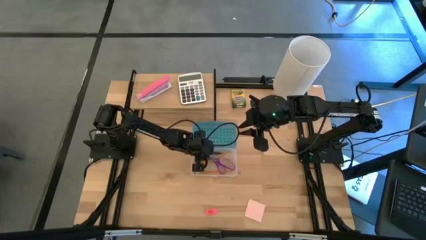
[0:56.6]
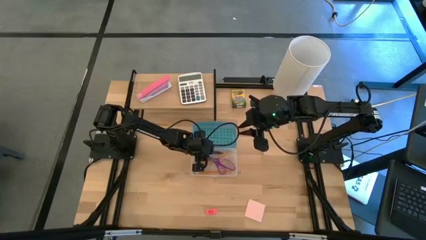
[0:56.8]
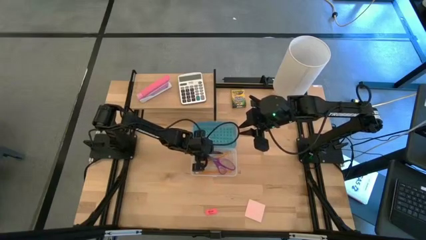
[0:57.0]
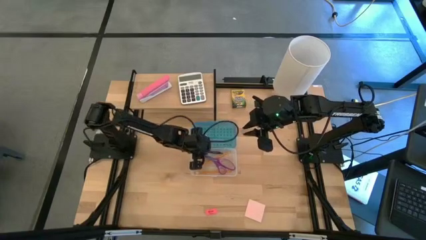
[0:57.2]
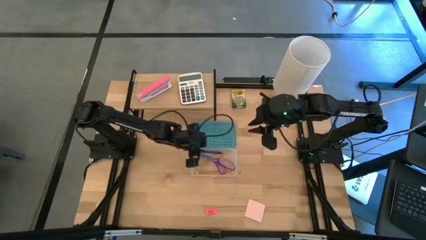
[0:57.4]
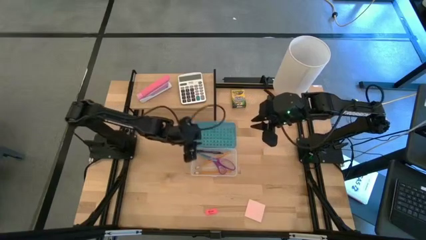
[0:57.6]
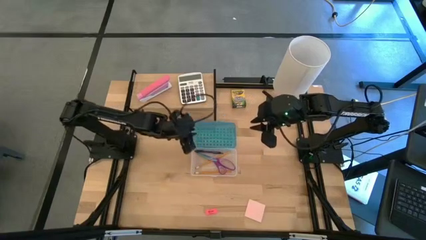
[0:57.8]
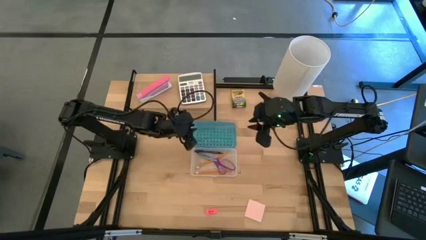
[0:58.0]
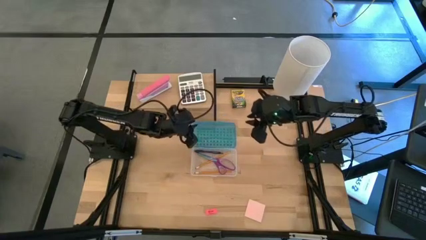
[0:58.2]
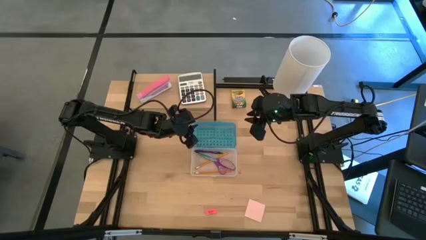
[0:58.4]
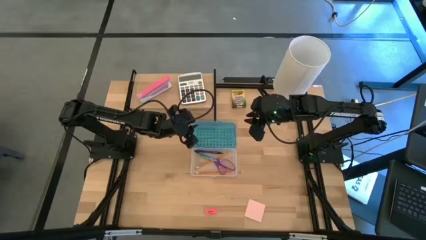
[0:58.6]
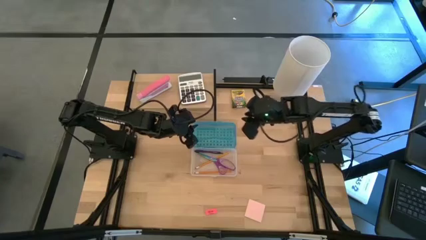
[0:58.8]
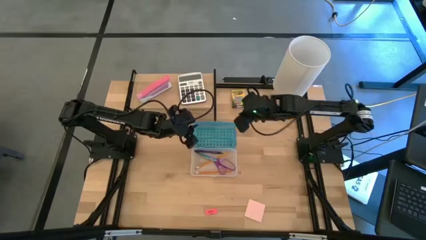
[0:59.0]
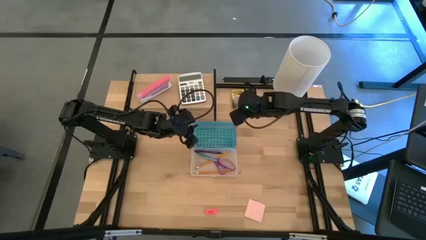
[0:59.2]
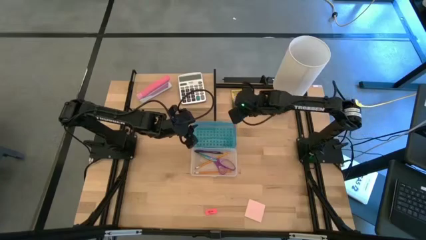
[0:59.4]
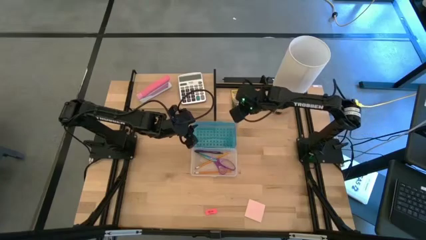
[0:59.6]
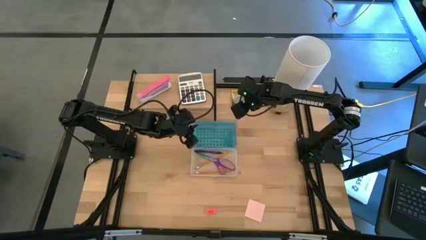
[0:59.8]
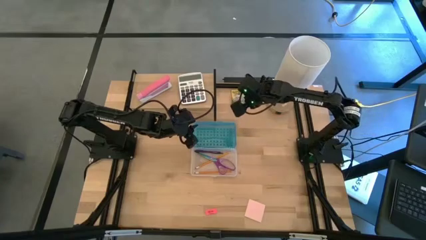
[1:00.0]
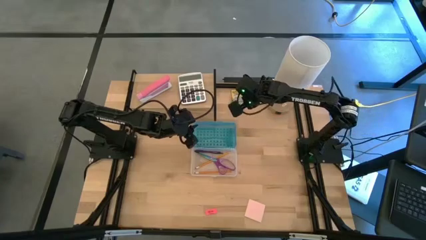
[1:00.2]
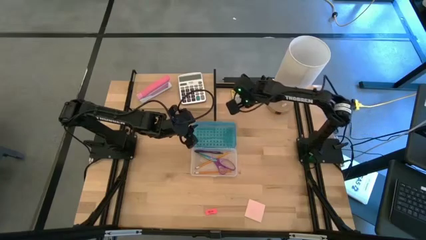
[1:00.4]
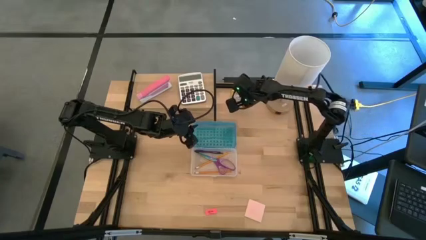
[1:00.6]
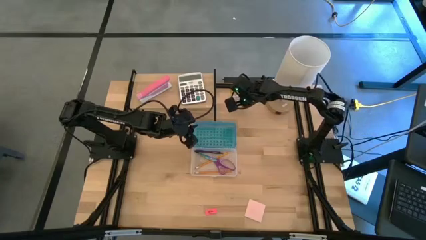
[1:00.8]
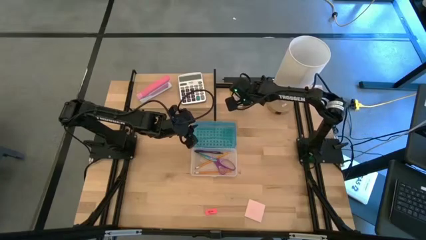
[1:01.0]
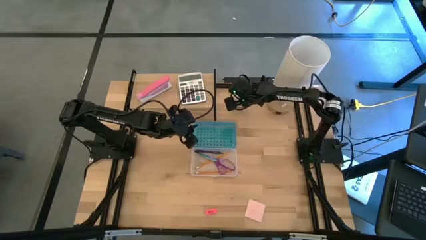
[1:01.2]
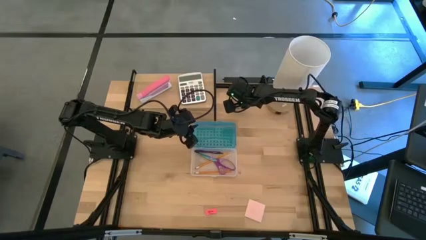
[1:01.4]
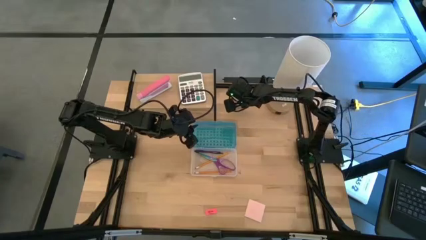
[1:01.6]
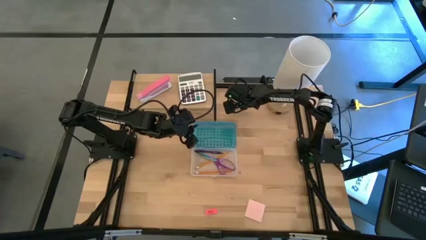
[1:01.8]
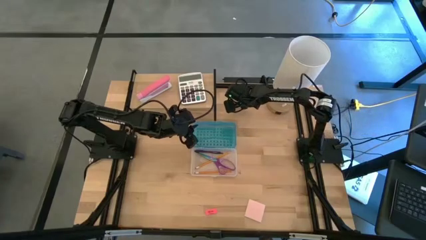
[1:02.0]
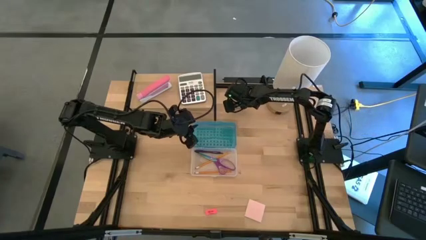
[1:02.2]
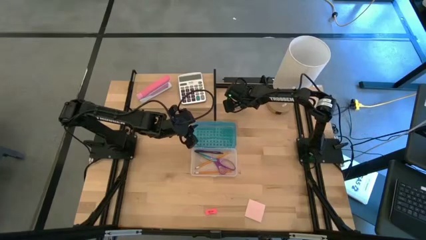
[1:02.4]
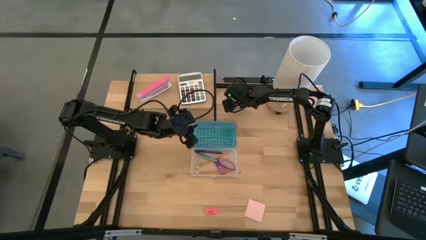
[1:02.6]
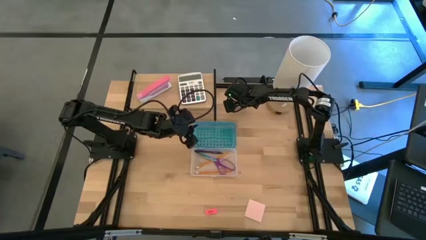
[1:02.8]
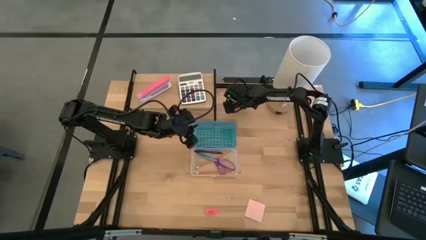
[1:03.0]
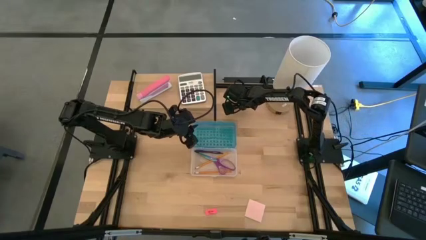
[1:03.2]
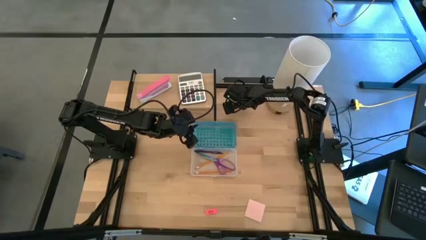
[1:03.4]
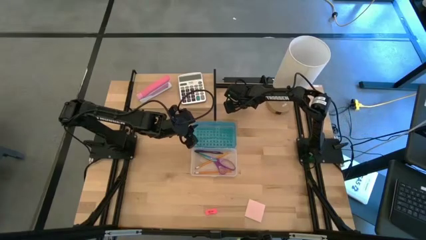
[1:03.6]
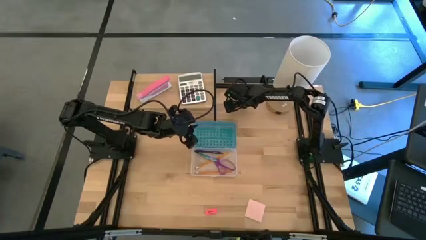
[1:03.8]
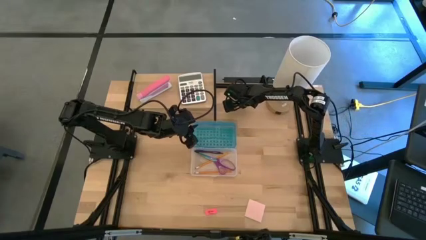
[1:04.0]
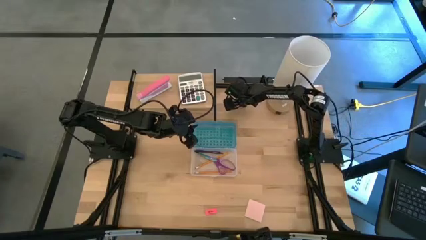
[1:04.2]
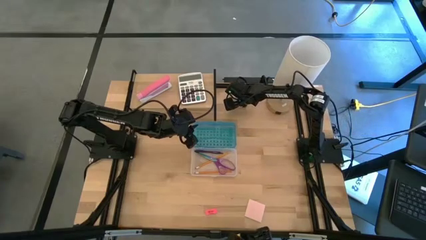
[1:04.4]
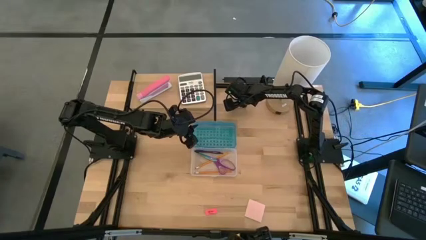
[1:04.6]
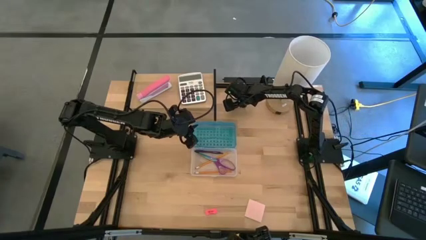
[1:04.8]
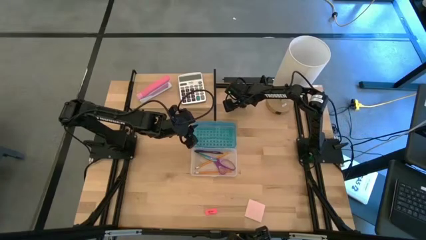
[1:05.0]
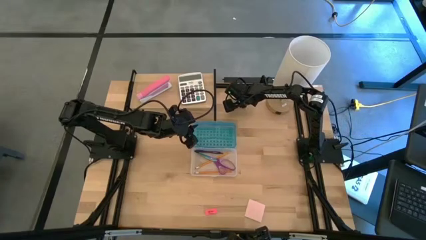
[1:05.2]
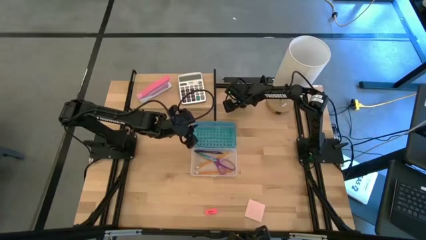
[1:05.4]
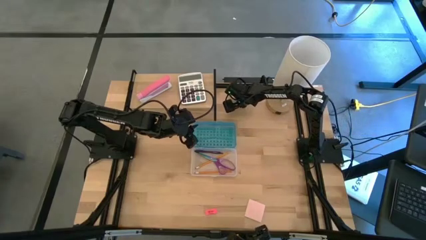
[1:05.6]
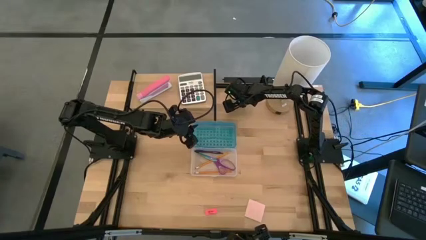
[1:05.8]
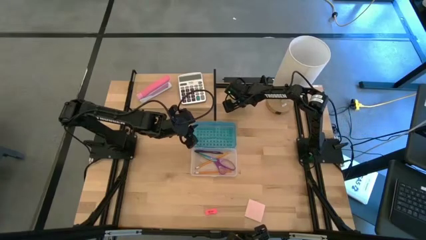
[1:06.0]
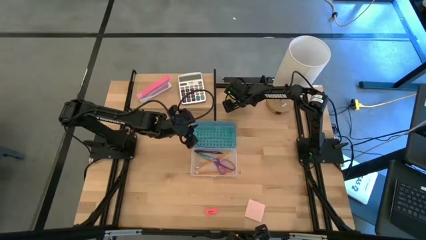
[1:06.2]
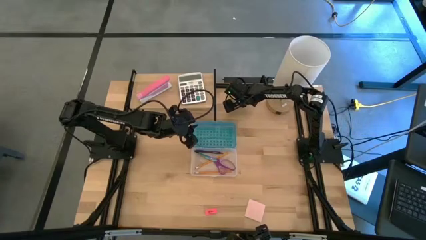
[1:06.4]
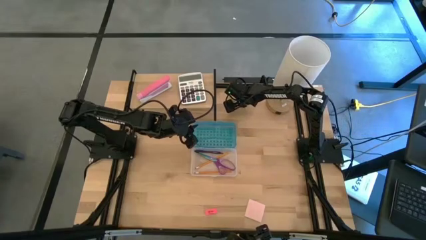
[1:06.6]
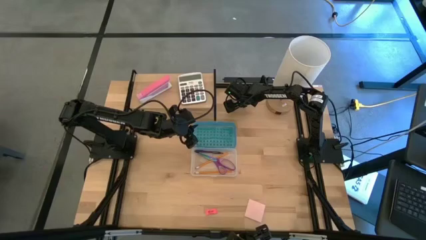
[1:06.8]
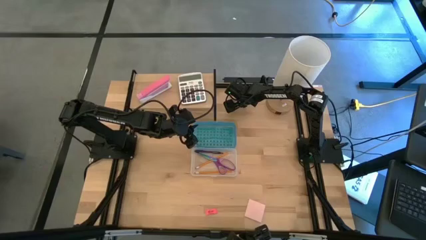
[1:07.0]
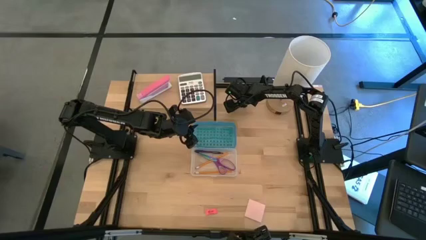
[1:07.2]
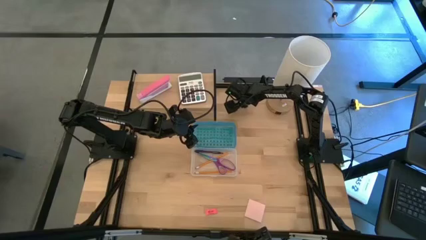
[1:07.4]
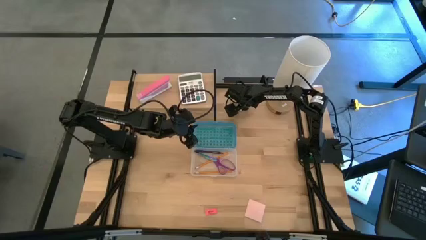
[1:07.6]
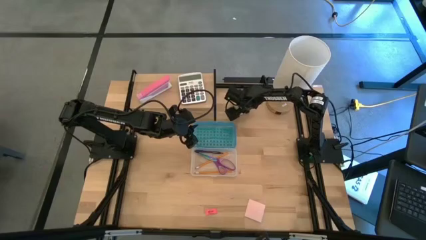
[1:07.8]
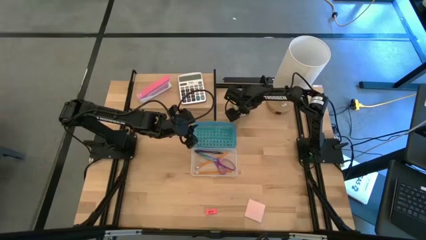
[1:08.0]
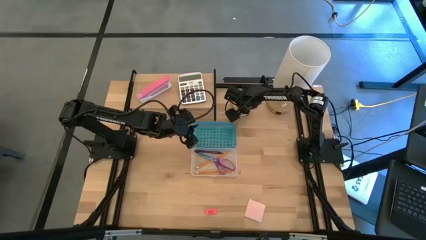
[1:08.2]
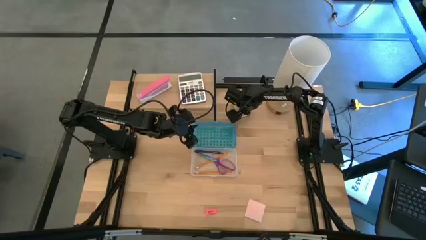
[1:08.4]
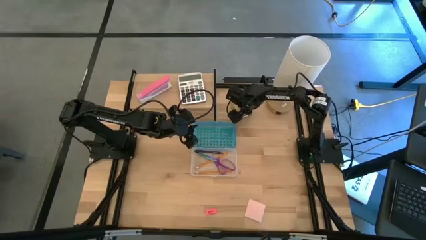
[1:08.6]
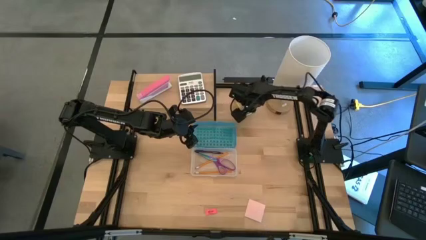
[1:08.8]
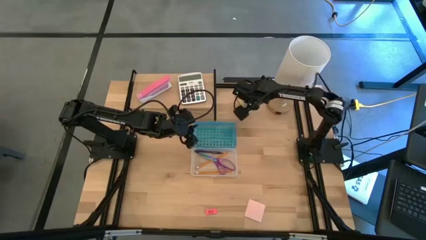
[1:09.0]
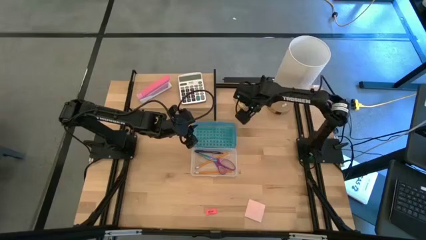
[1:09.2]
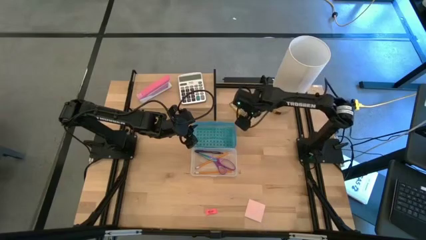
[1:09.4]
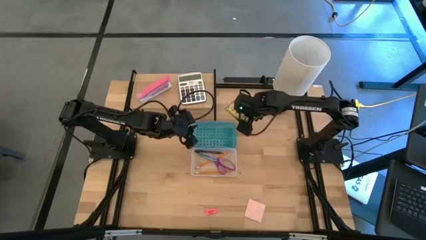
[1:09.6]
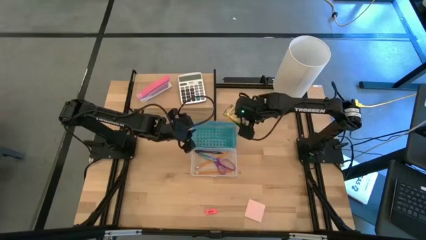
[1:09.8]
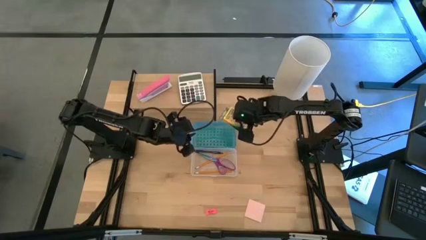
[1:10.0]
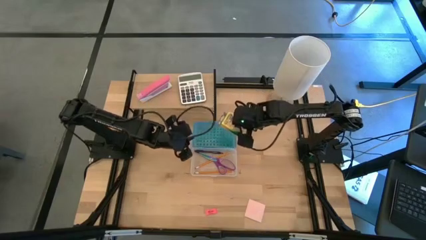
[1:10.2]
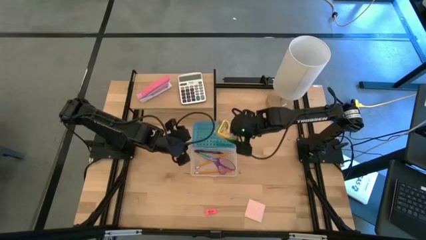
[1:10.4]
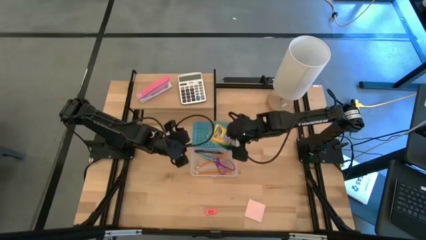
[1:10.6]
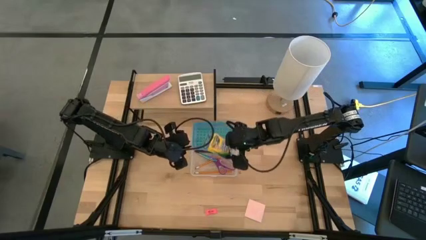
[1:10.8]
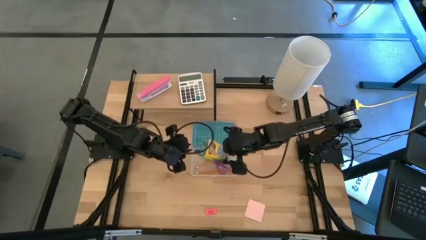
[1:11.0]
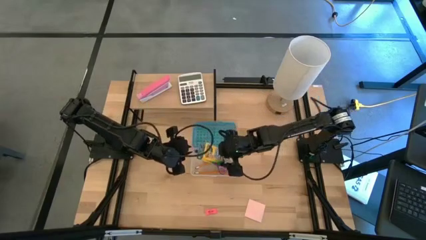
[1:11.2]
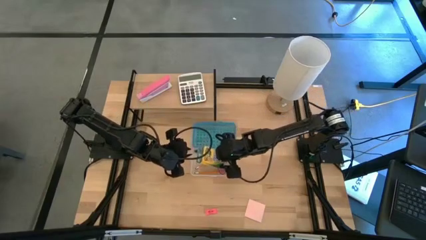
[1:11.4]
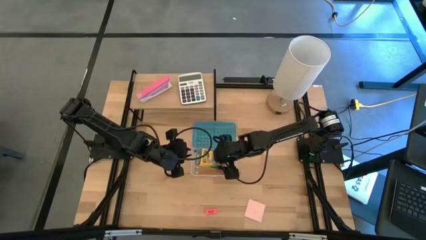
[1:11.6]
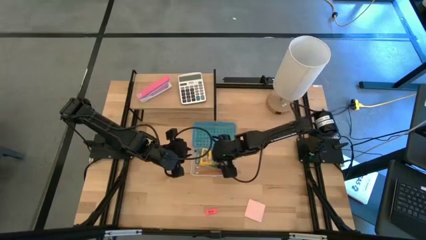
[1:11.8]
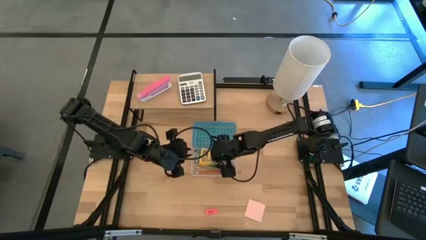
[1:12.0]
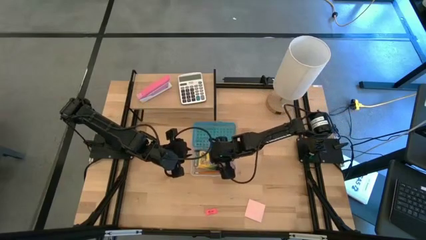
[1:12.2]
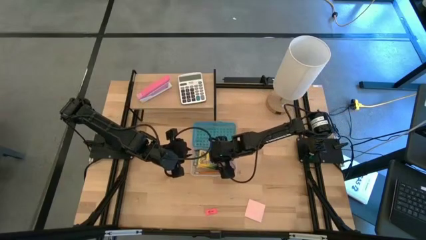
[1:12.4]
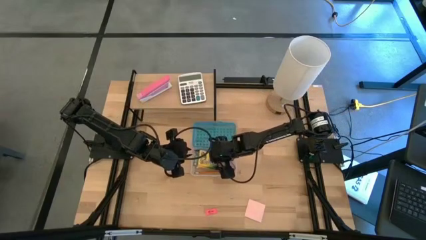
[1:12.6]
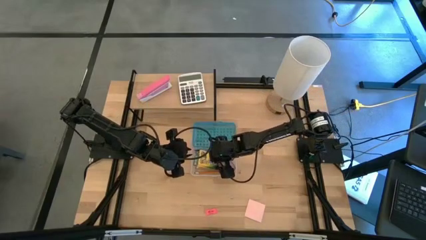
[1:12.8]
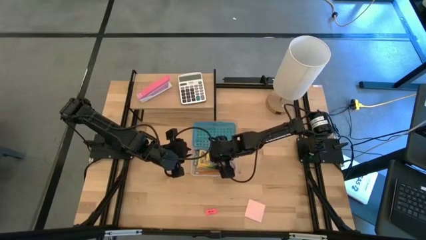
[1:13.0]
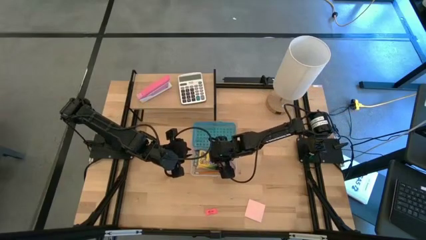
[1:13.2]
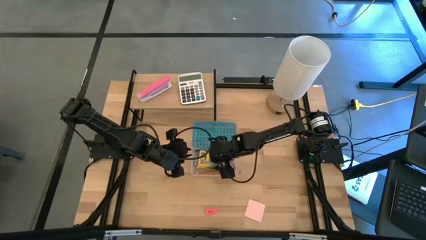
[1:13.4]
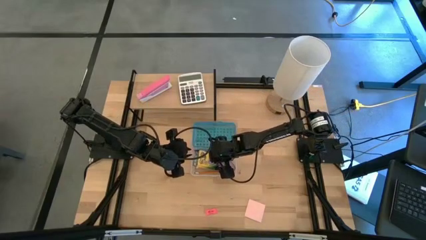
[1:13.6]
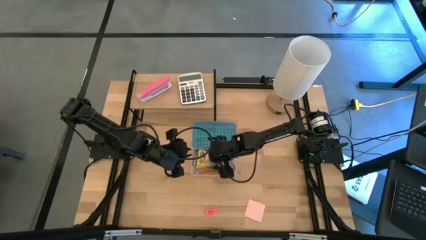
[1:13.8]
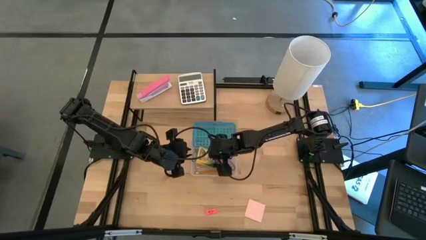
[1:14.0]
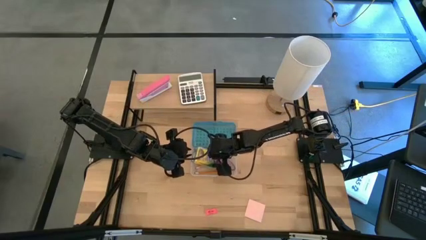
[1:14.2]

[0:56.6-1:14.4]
Task: Pack school essentials
Put the yellow crayon box into the blue supply box

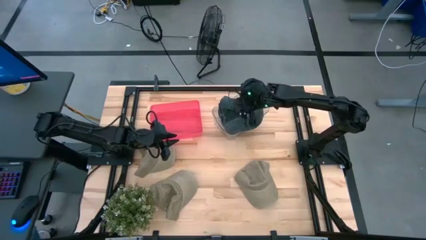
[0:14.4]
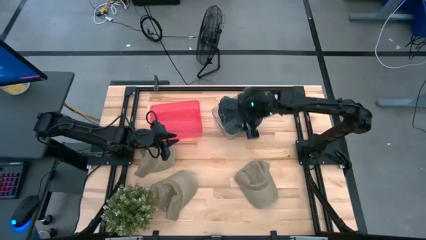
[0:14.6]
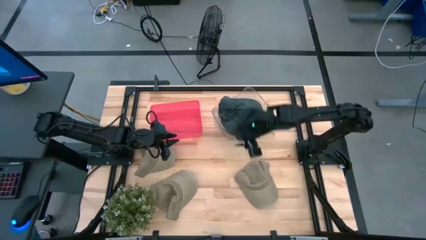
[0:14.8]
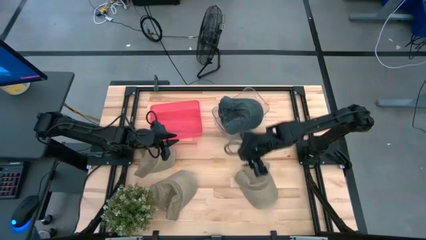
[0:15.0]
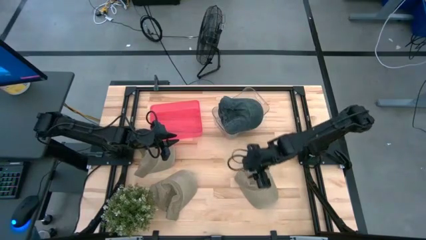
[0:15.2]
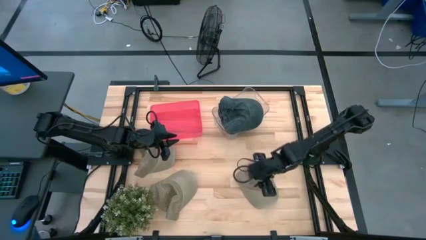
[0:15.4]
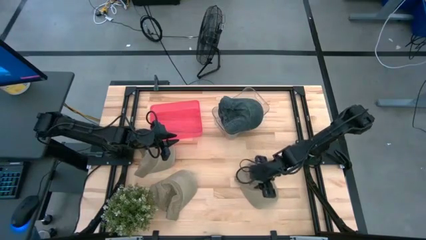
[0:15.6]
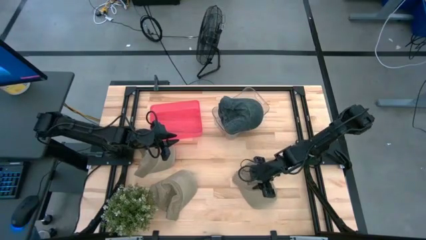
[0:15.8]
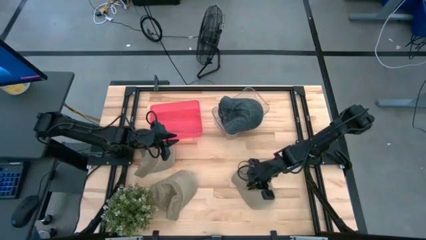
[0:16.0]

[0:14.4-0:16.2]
Task: Pick & Place hat
Put the bottom right brown cap into the red bin
